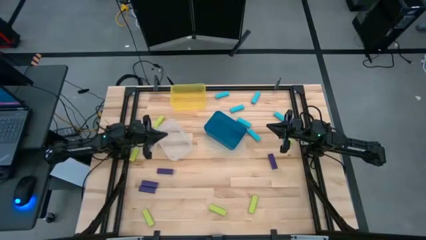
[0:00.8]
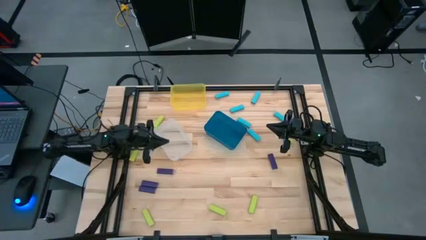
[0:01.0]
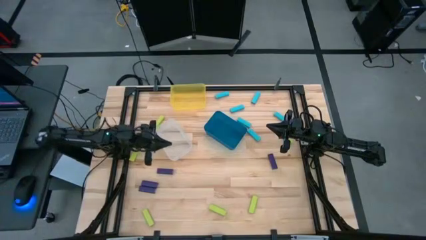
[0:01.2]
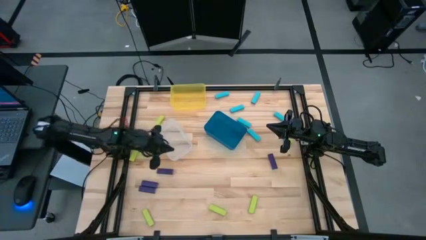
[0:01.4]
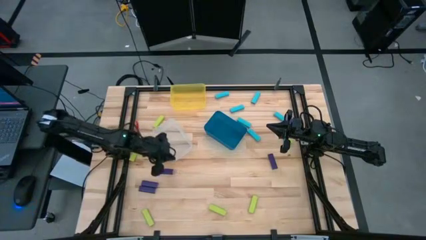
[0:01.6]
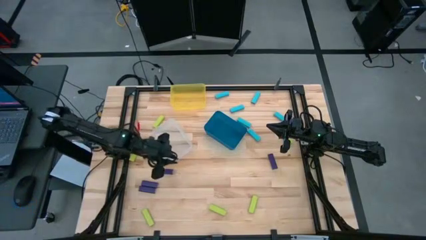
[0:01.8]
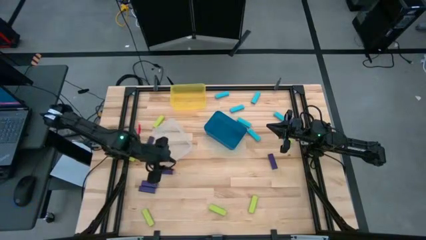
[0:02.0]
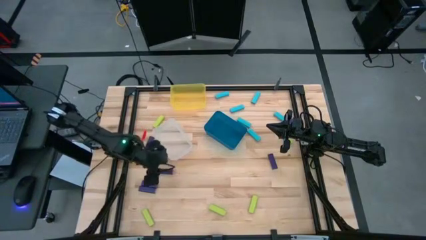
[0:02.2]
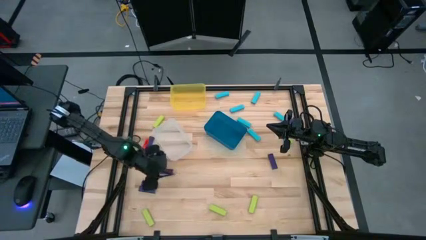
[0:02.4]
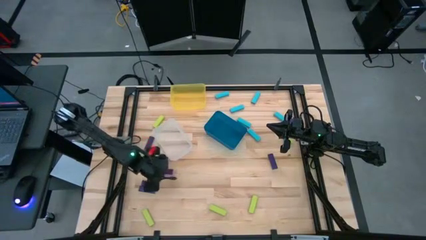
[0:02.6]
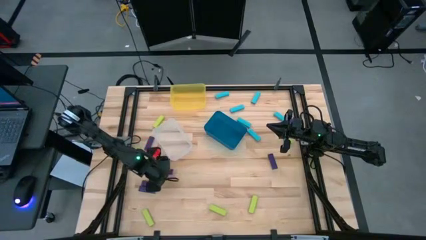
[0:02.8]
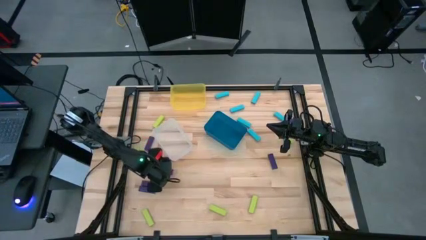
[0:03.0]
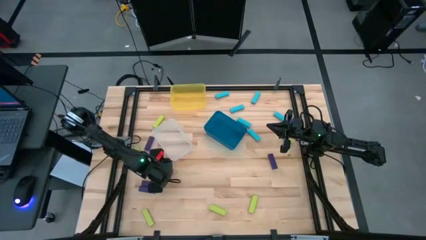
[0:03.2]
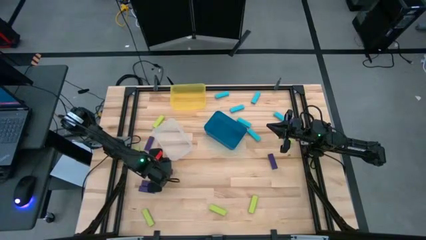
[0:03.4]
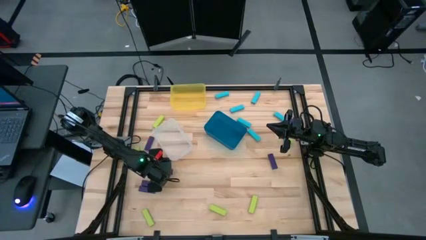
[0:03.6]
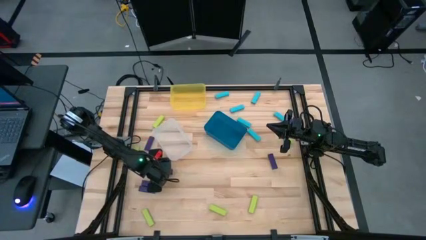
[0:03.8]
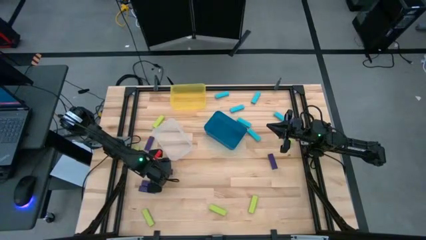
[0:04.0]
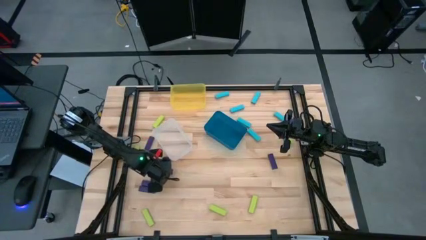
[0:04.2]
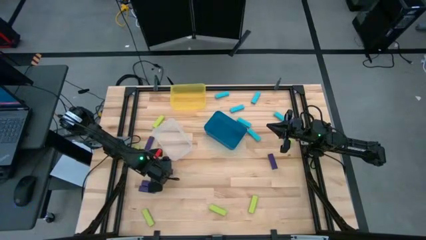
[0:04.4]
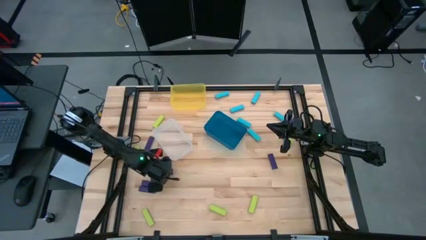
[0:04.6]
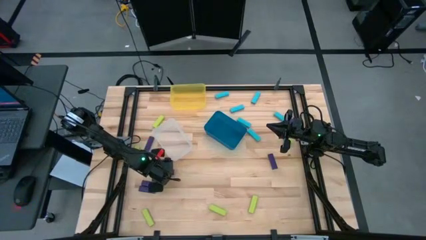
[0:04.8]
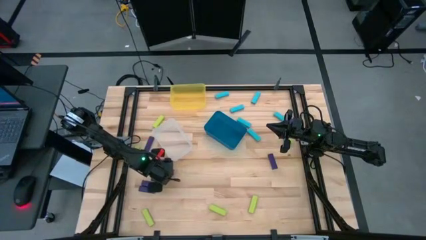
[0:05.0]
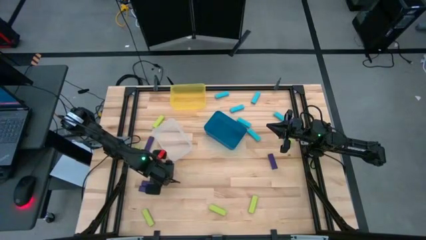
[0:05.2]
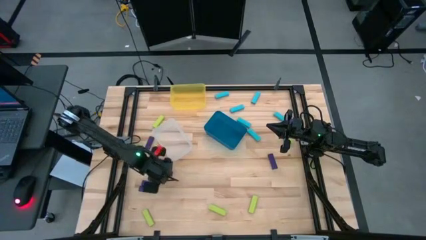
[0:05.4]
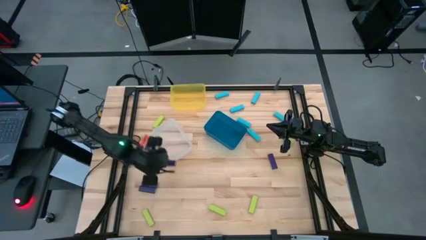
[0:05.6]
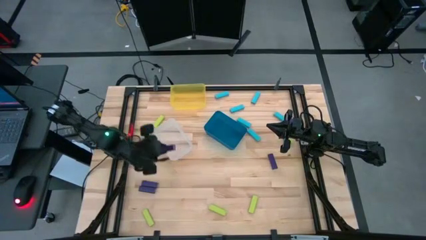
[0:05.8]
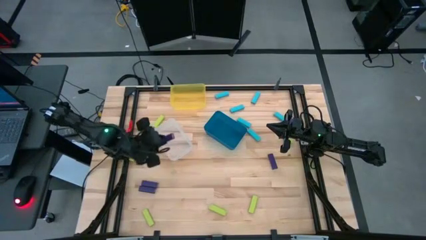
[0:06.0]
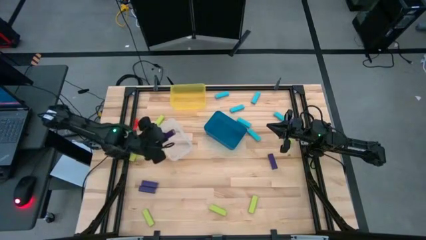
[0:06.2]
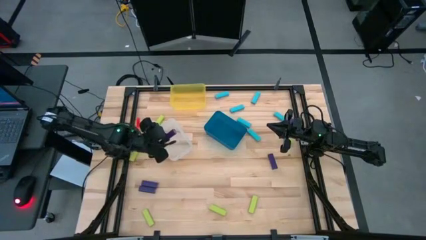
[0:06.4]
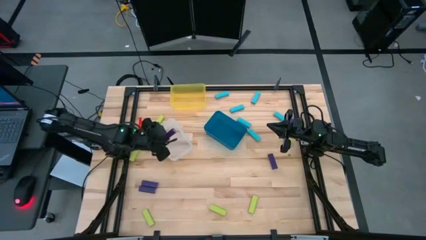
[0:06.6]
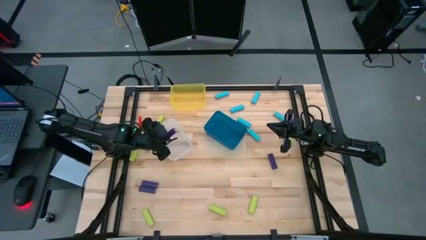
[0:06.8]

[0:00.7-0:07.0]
Task: Sort blocks
Put the violet block into the transparent bin

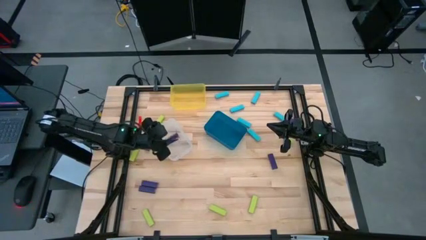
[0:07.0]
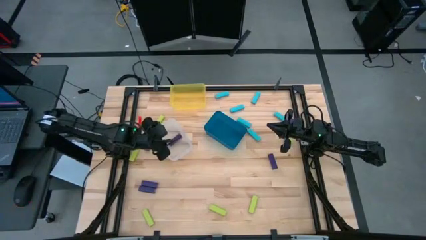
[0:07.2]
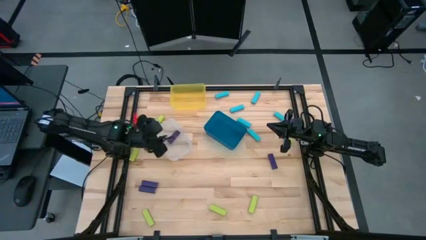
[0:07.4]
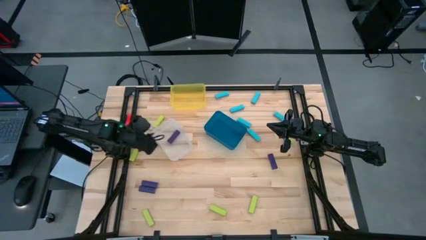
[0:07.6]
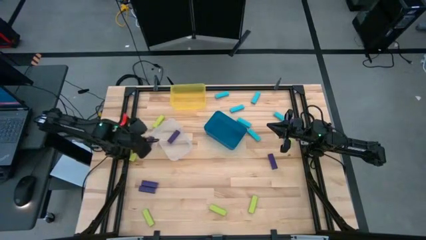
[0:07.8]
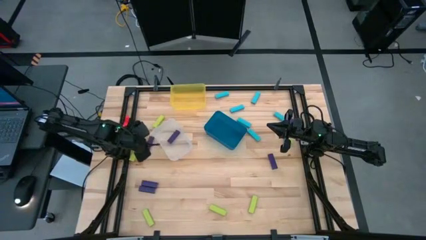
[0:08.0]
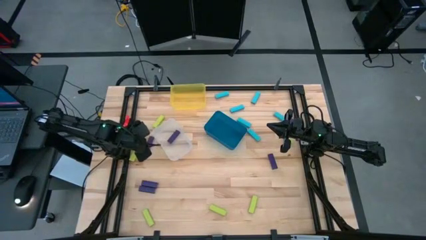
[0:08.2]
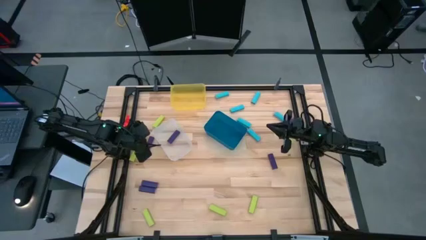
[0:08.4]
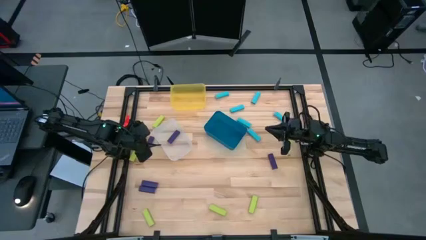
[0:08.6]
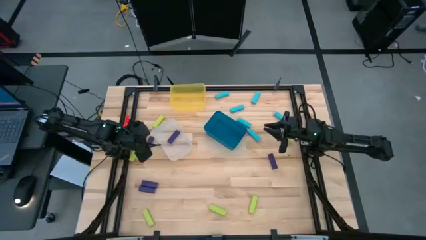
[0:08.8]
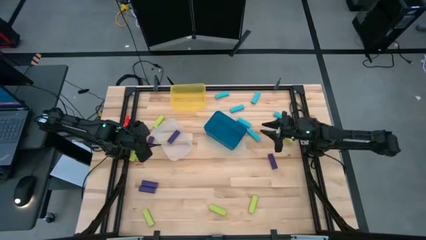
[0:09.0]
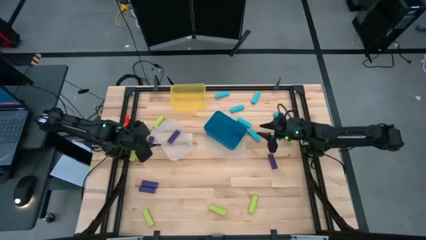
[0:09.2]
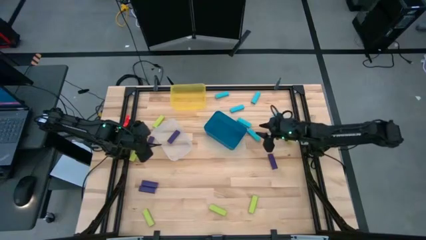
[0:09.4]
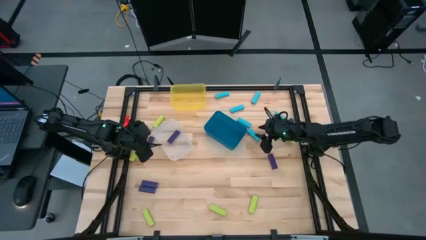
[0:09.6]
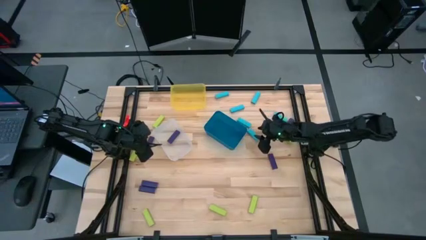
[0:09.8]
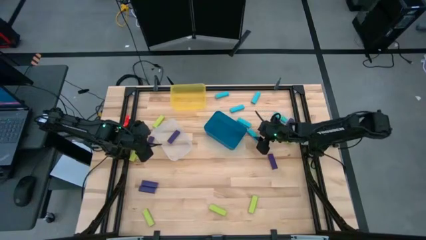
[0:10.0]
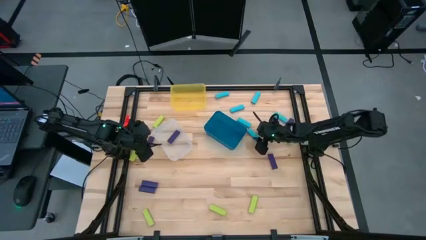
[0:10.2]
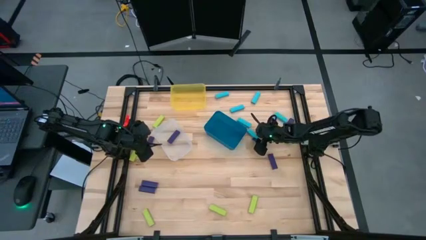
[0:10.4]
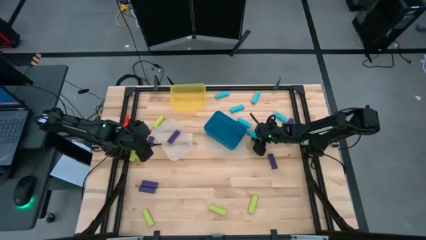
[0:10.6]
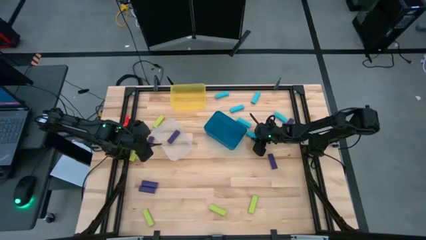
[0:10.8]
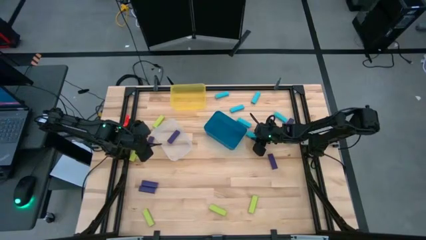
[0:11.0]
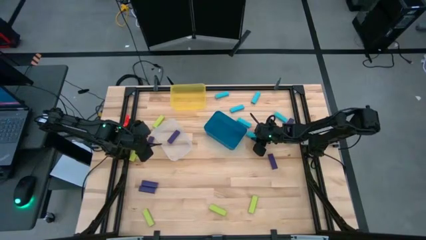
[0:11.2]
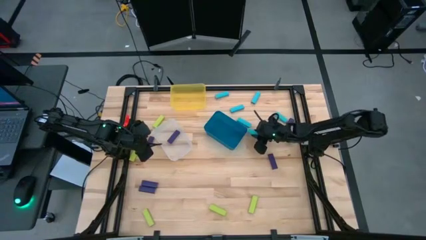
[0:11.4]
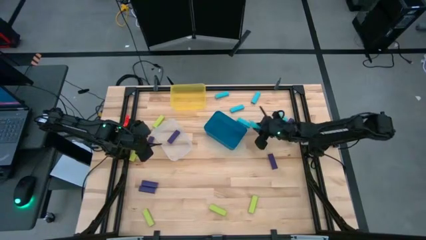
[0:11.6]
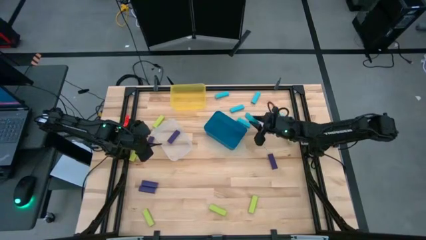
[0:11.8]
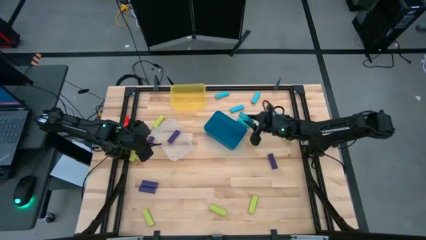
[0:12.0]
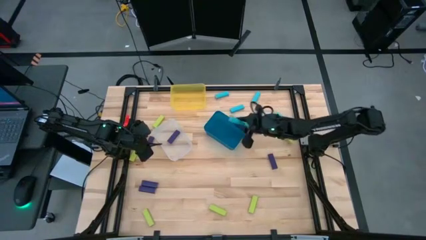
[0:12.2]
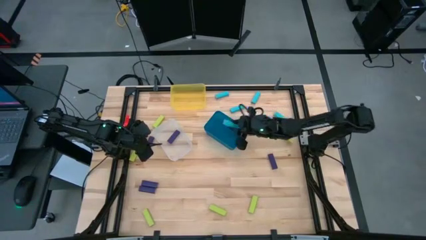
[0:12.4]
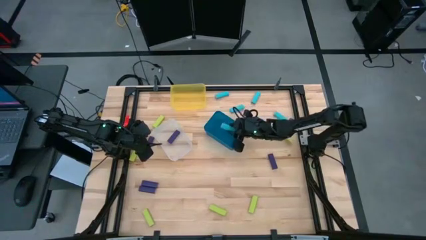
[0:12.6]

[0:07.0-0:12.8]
Put the blue block into the blue bin

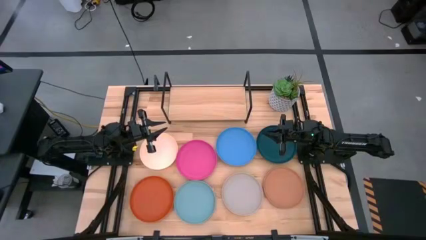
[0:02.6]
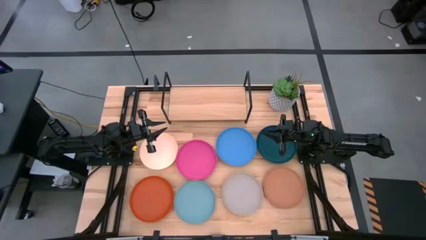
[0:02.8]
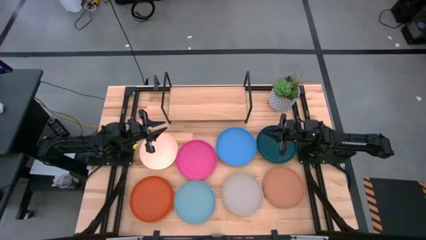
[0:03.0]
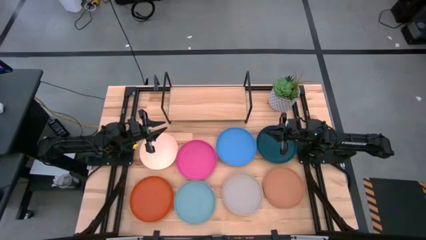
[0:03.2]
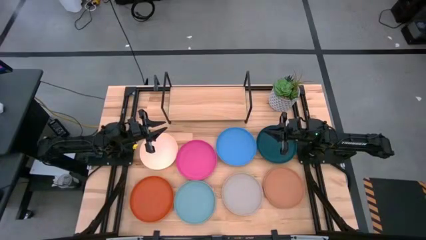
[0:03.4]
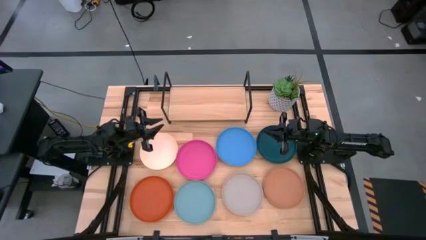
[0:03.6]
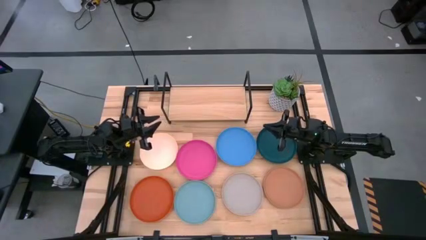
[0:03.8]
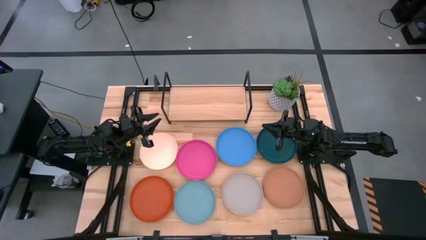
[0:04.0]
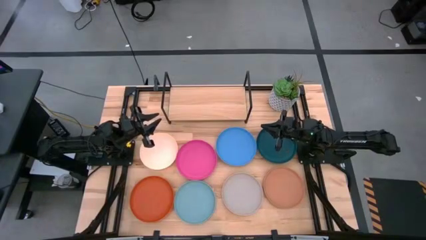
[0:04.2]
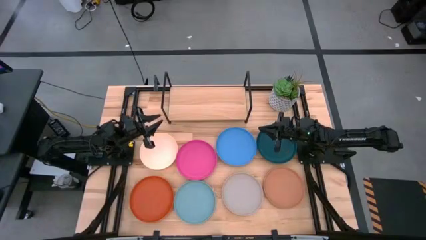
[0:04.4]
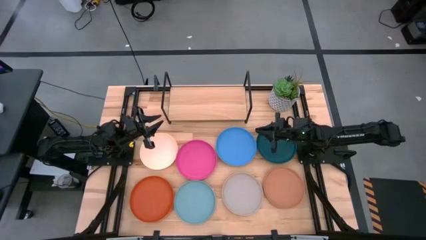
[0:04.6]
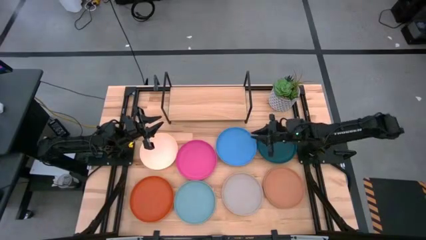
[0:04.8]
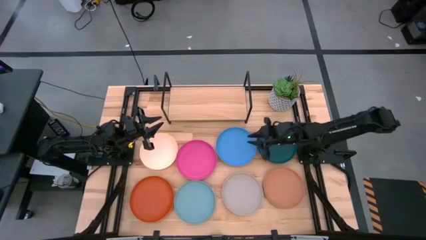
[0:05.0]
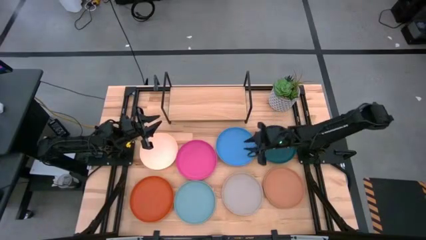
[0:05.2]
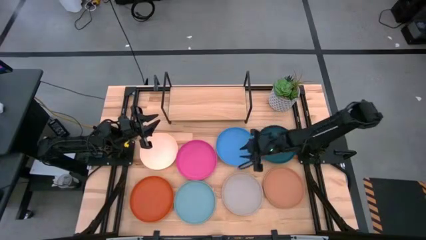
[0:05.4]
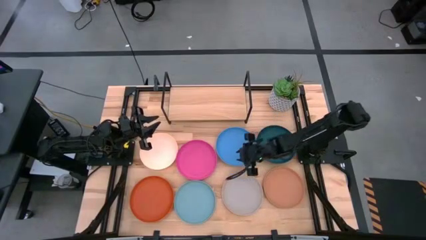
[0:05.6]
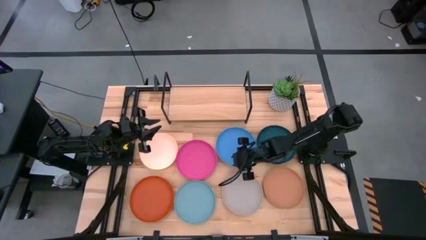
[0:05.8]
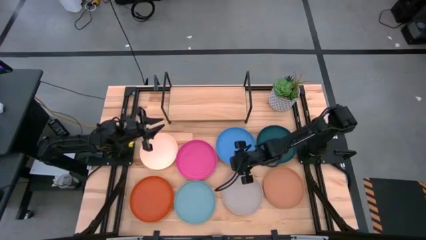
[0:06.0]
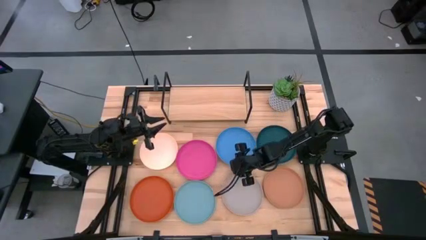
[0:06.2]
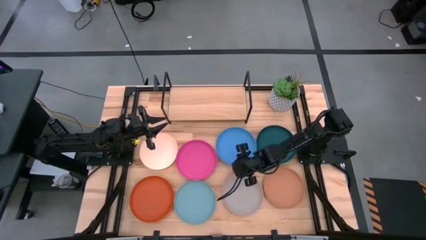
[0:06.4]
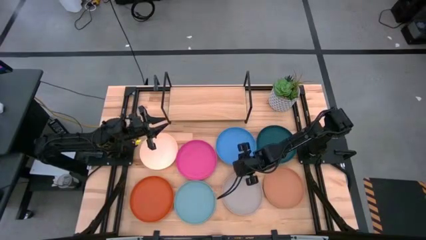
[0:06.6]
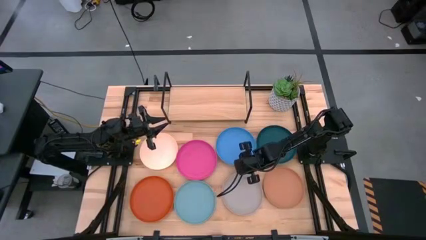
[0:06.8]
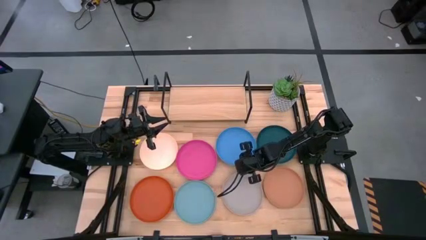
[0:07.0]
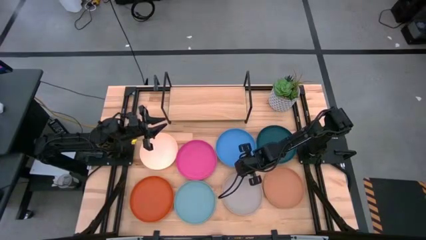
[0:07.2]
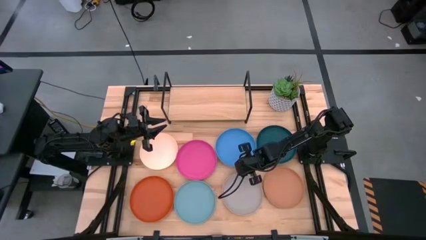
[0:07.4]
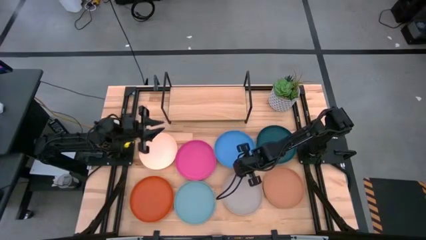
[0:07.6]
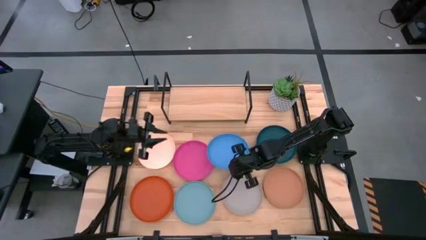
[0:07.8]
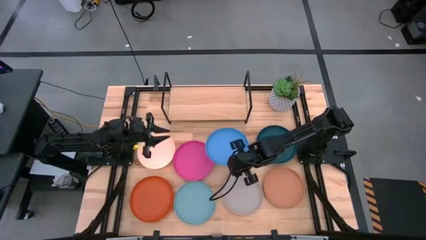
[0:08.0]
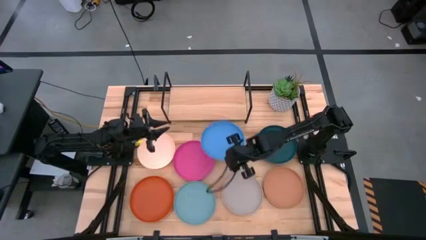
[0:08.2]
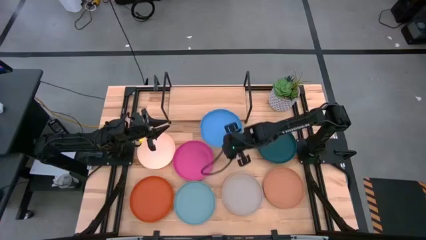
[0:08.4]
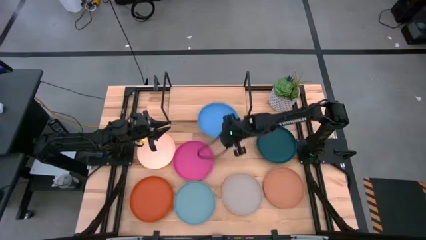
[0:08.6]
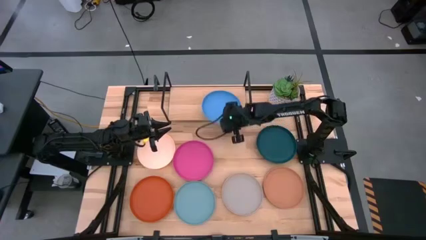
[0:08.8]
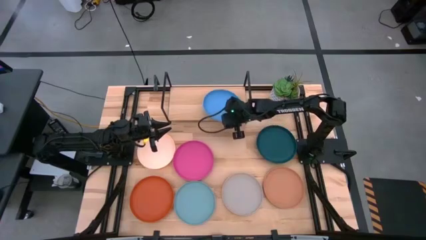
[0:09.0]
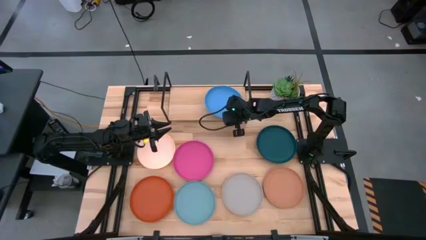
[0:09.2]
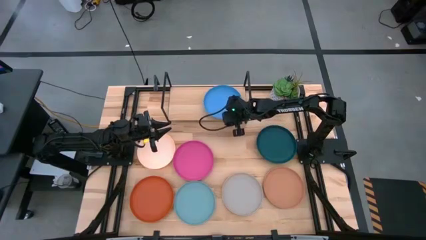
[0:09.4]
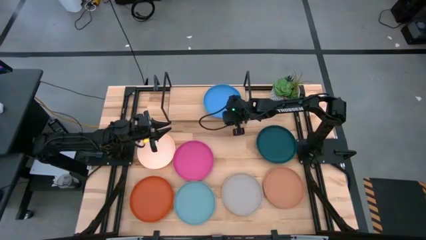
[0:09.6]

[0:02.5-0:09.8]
Task: Place and stack plates onto a shelf
Put the blue plate on the shelf
